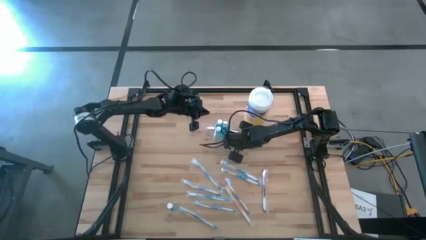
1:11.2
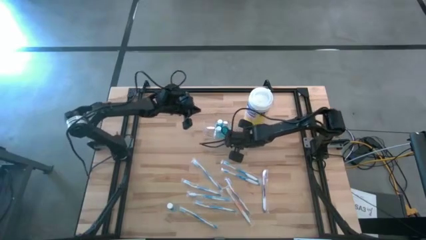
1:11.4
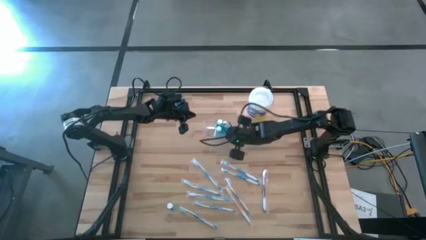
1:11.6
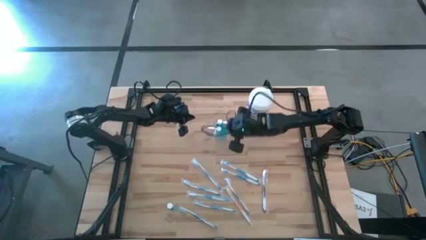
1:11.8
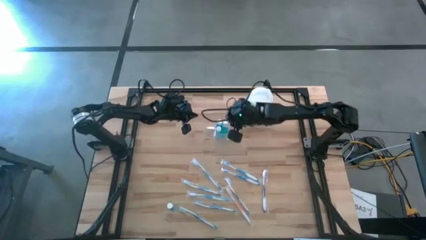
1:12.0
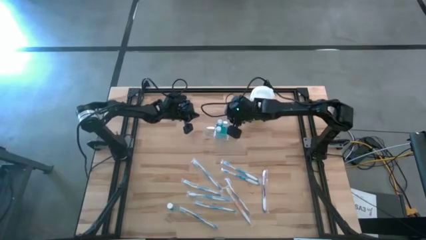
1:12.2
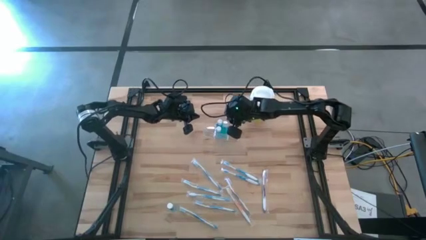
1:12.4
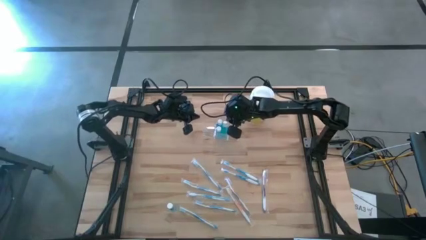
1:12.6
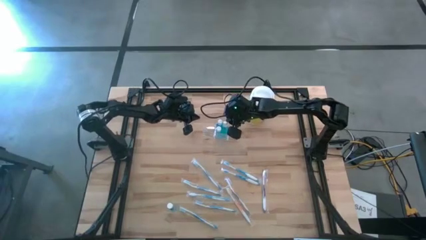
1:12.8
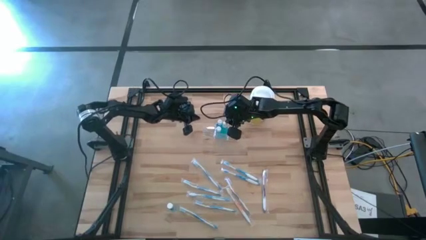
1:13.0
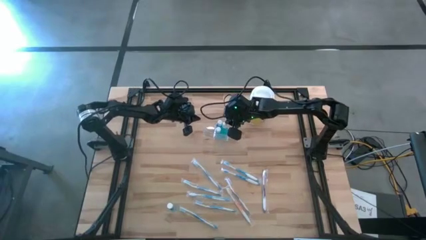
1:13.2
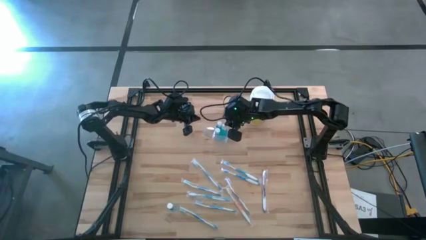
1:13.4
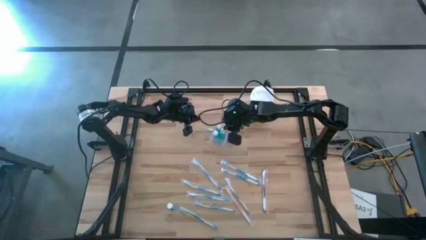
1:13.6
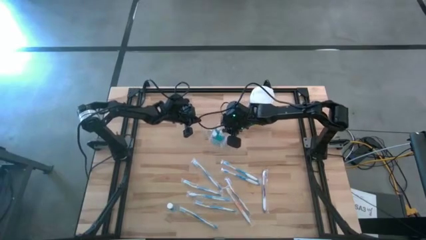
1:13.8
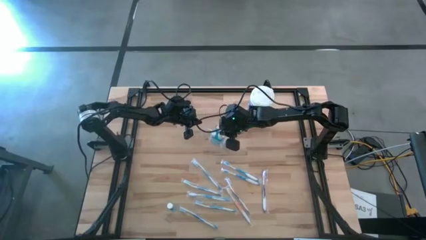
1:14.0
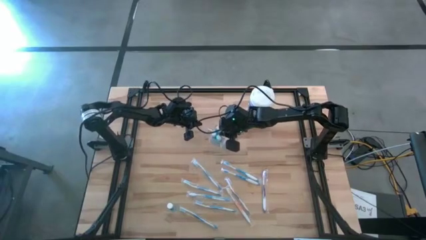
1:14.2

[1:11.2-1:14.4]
Task: Pick & Place toothbrushing station
Adjust the blue mouthwash in the transparent organizer

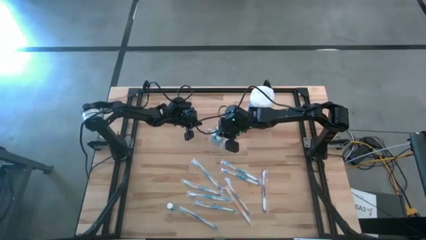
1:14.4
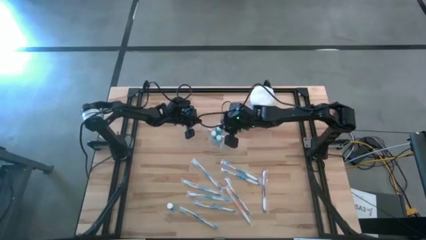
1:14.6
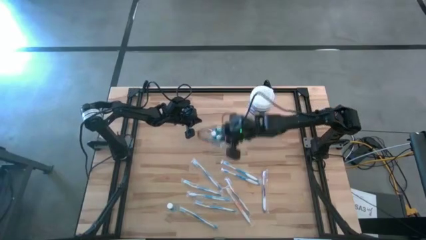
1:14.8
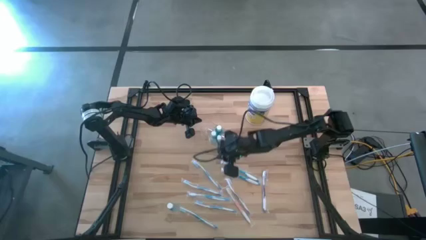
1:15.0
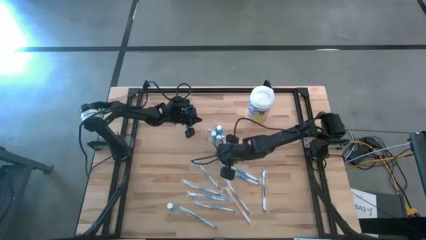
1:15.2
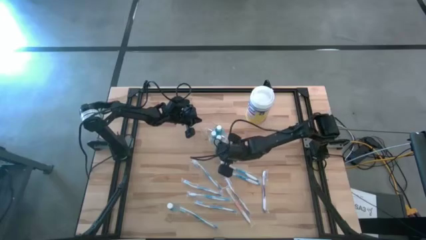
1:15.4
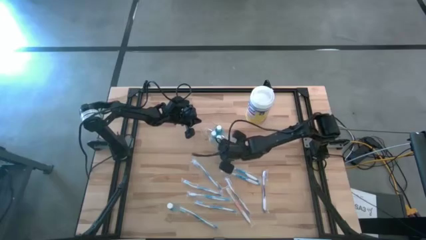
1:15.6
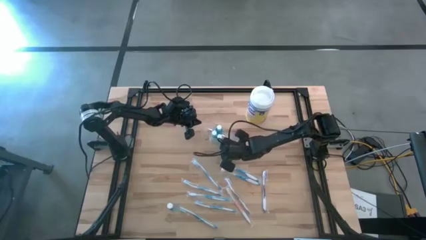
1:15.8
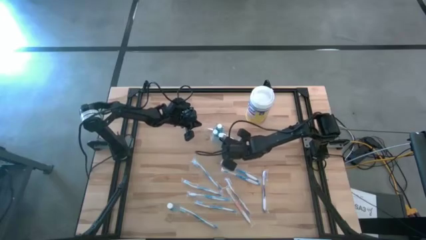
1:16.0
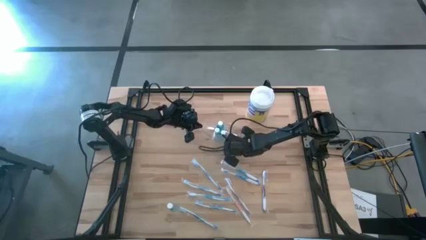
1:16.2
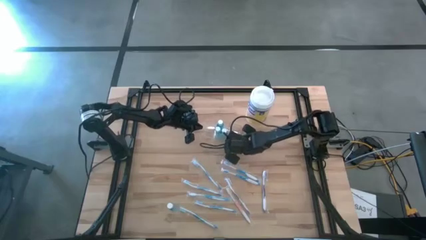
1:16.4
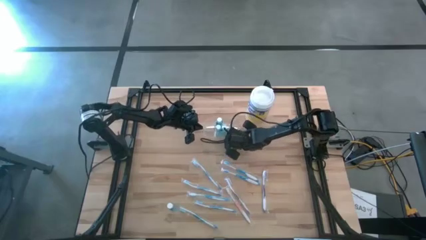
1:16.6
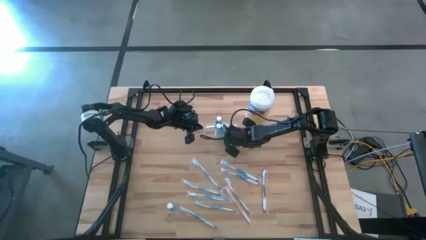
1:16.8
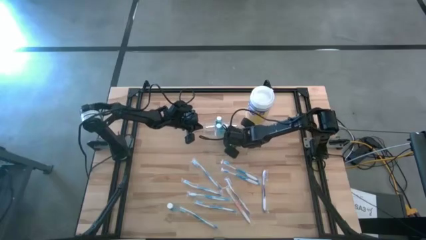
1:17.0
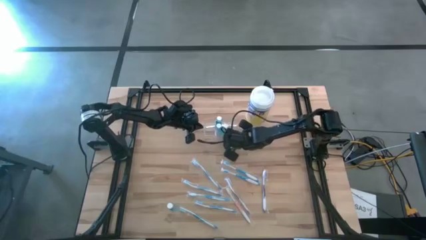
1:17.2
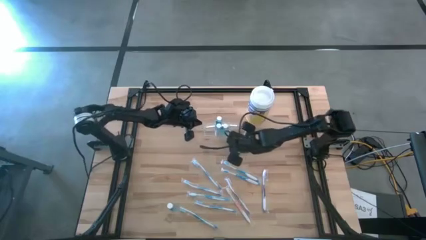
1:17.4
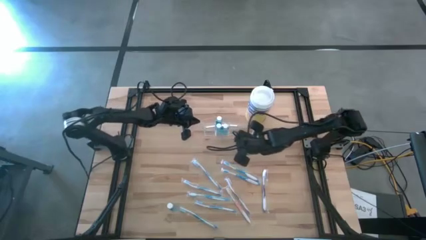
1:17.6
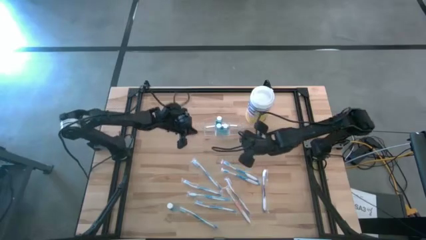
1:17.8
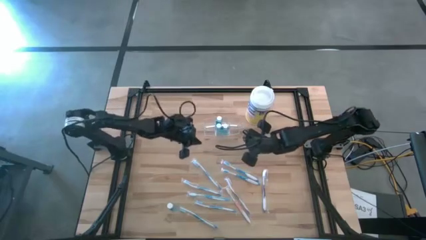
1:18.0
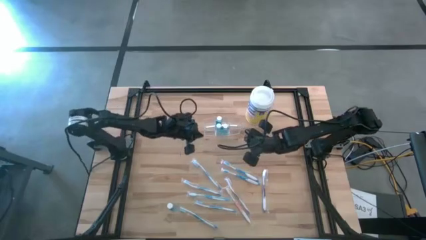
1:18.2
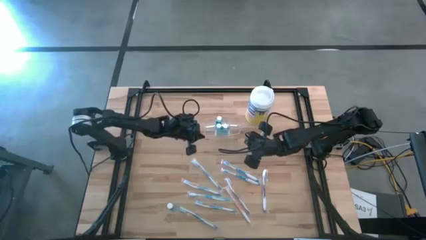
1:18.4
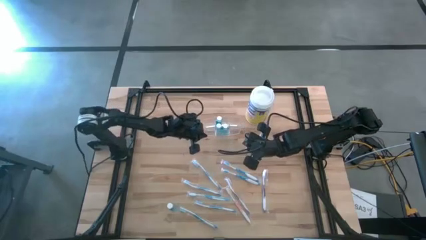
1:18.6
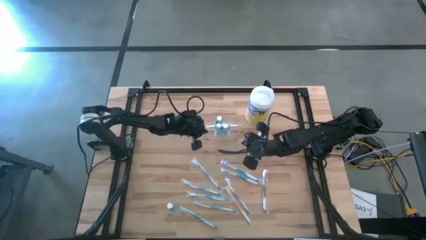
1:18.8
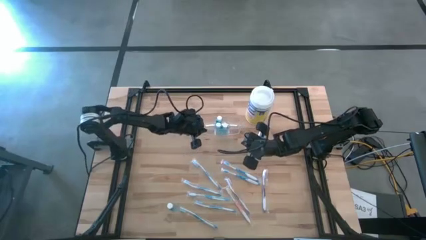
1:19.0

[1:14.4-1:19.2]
Adjust the transparent organizer

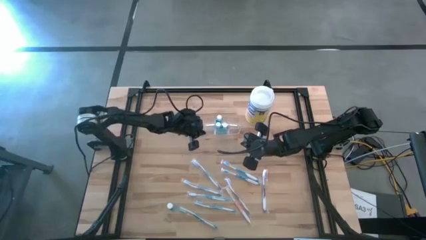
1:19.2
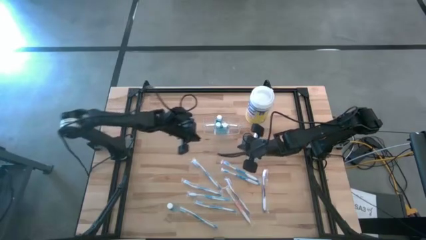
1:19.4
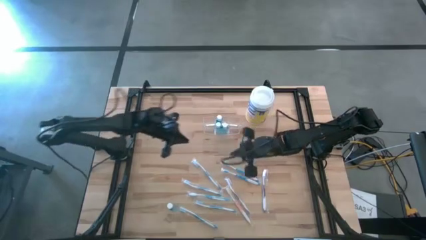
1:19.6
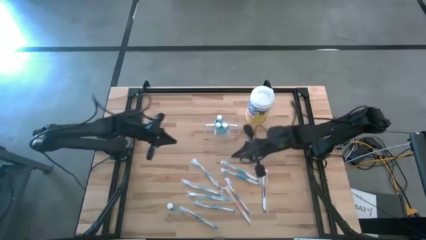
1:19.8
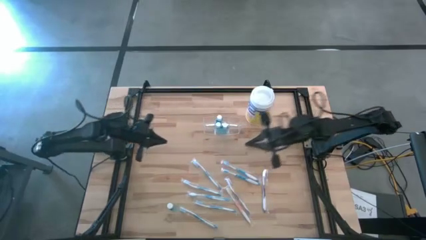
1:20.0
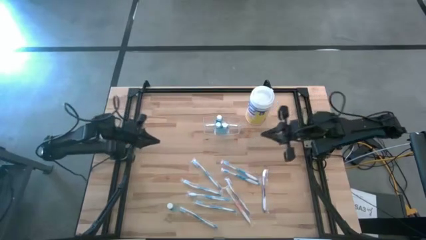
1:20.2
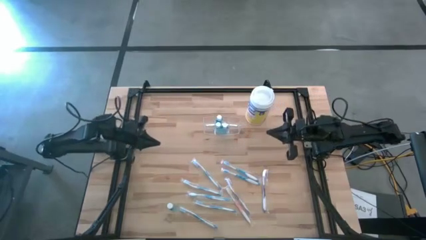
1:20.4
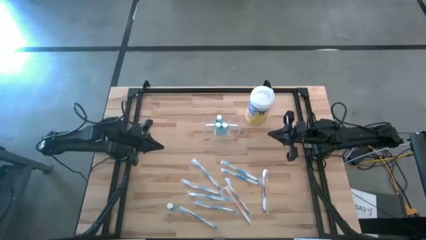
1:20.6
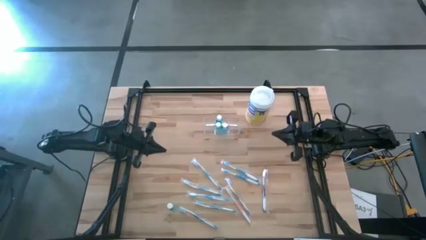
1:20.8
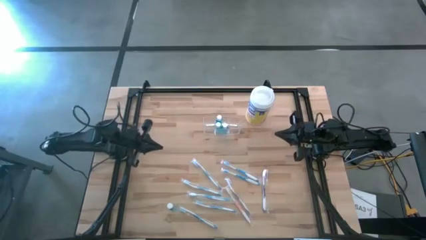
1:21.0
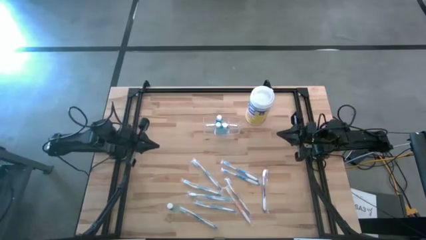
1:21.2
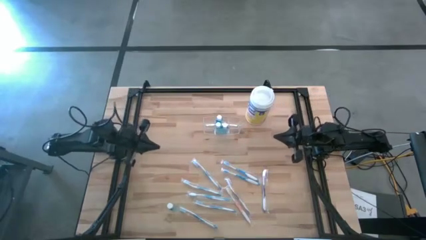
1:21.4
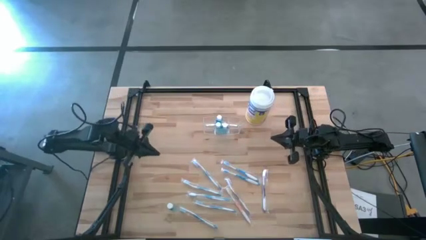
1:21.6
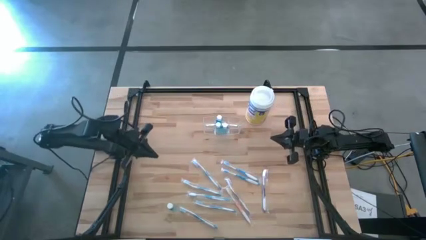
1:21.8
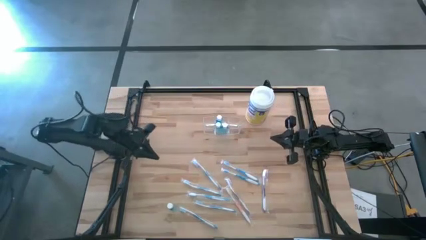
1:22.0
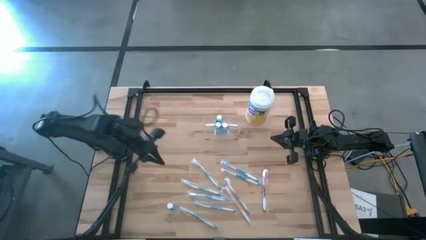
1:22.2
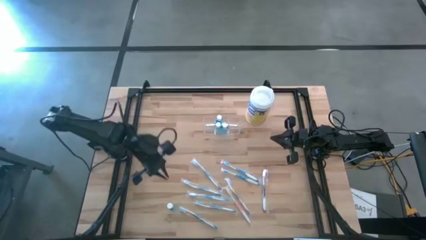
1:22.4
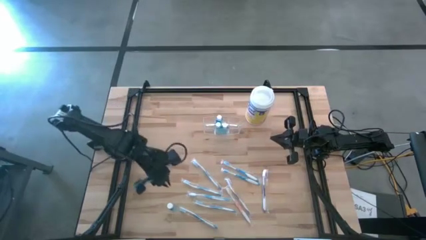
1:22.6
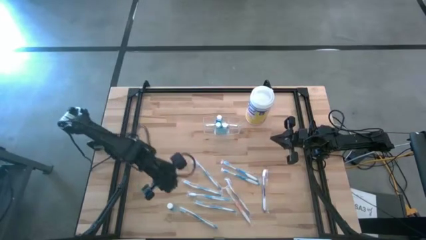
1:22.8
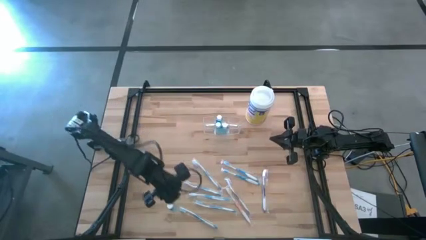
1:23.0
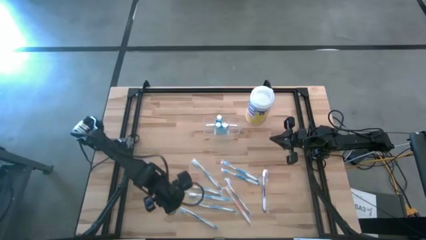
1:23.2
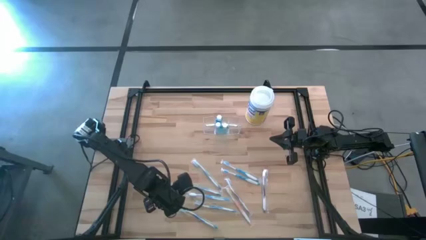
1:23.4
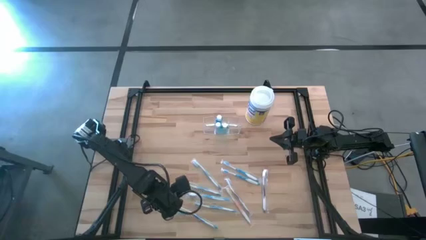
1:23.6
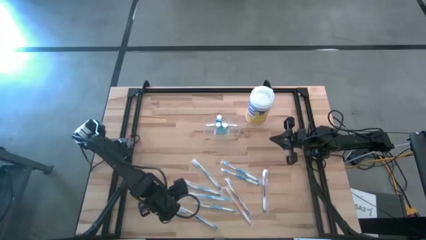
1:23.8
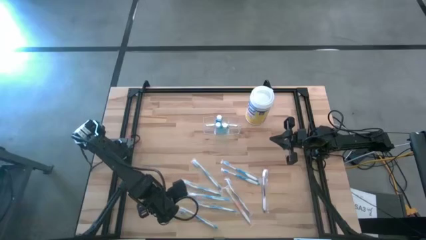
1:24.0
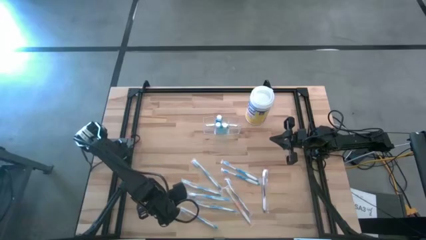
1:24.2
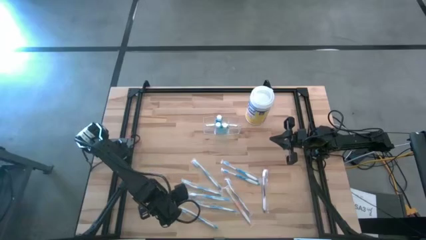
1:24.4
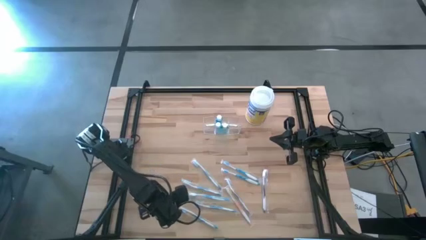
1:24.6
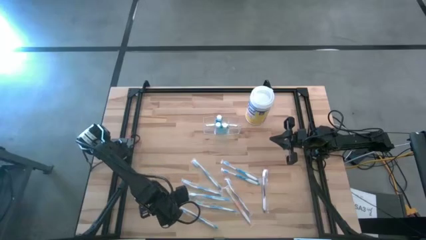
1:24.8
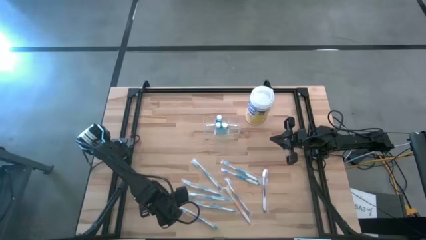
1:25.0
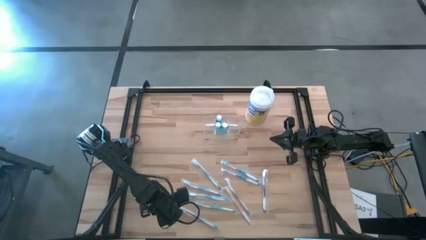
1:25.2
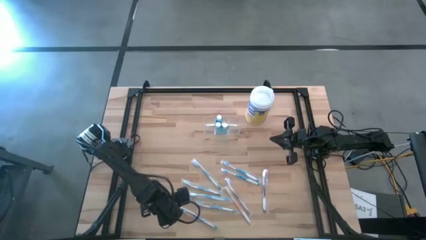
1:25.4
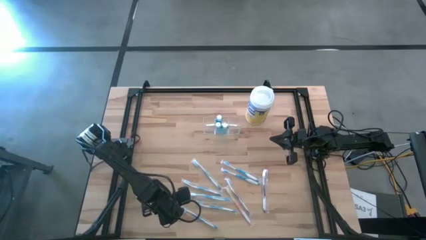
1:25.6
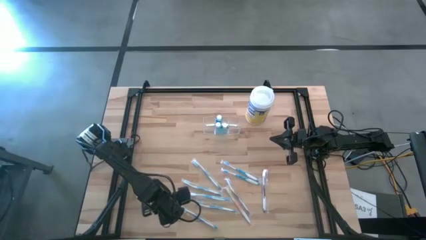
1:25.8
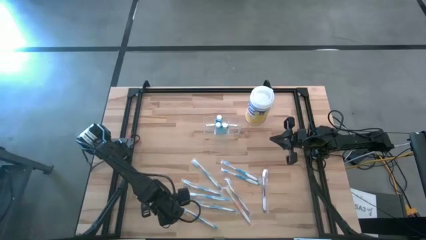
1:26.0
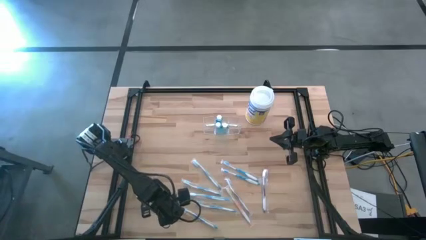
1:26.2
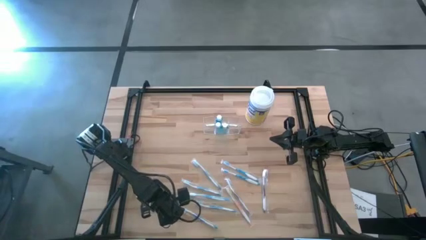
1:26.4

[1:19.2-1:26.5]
Put the blue mouthwash into the transparent organizer
